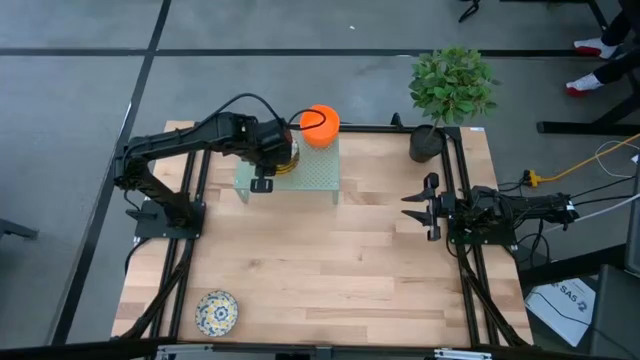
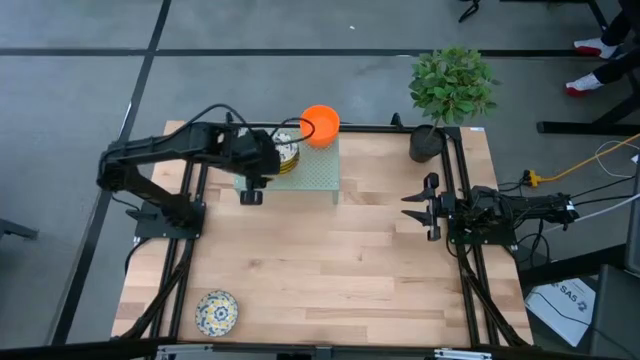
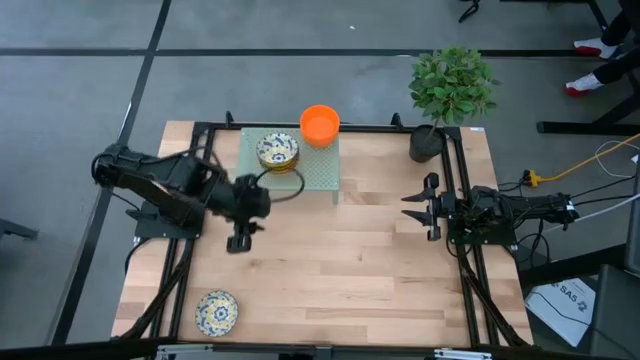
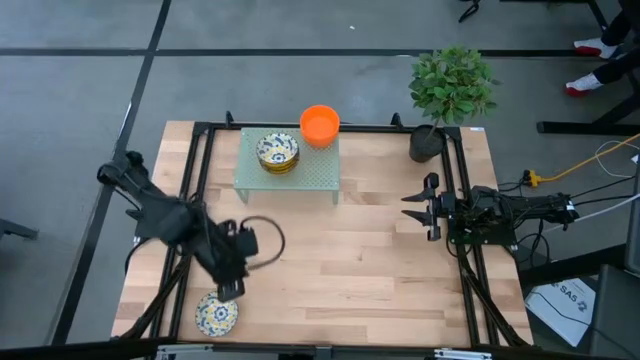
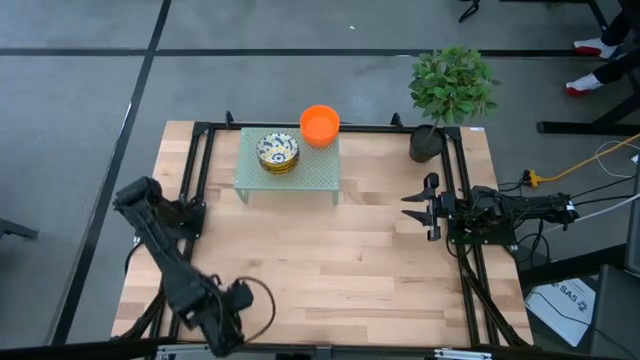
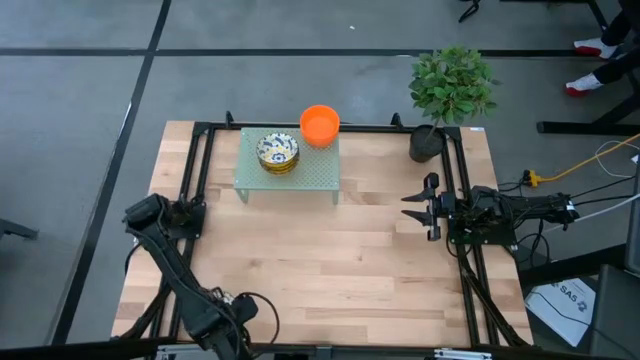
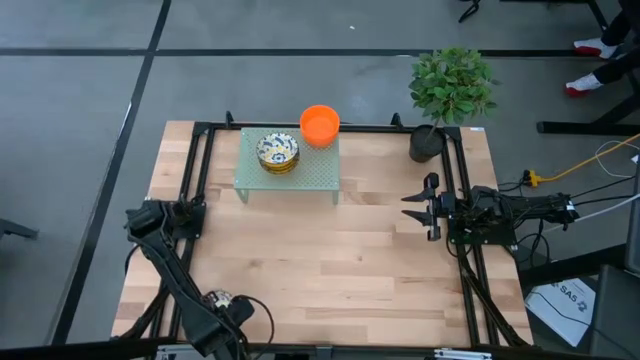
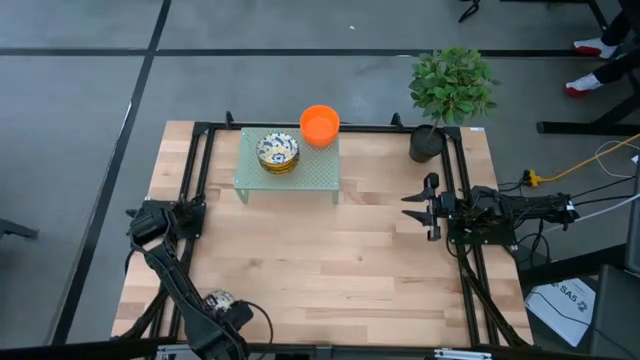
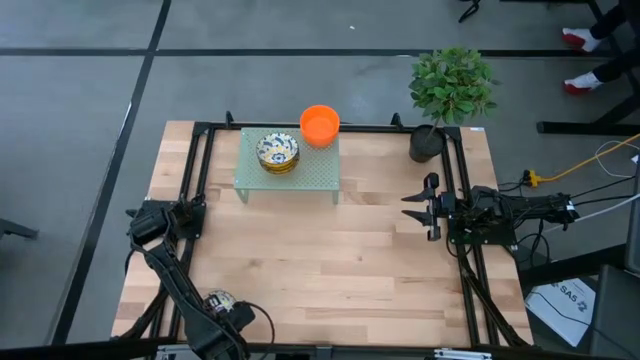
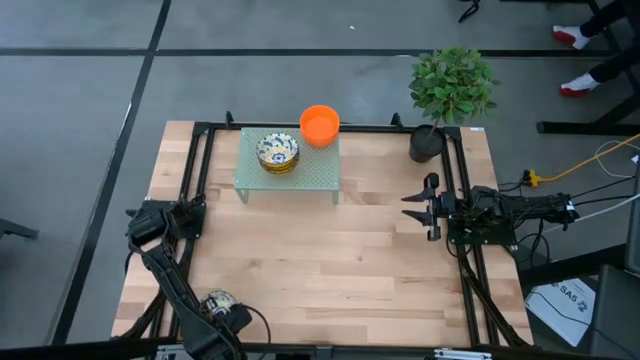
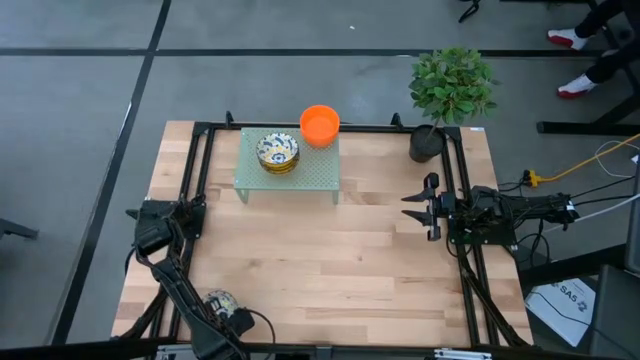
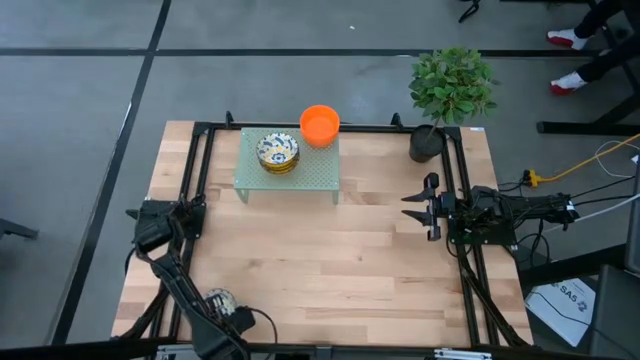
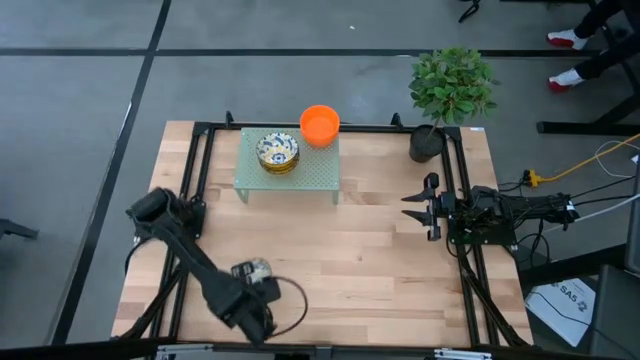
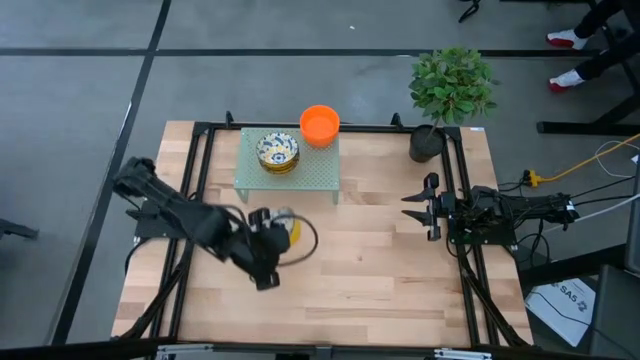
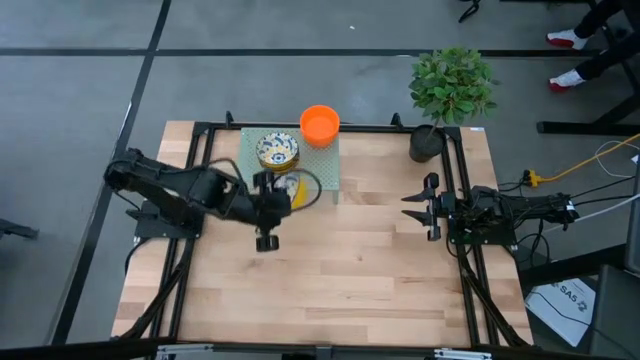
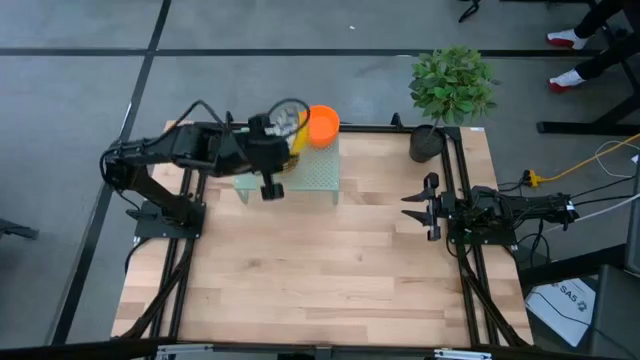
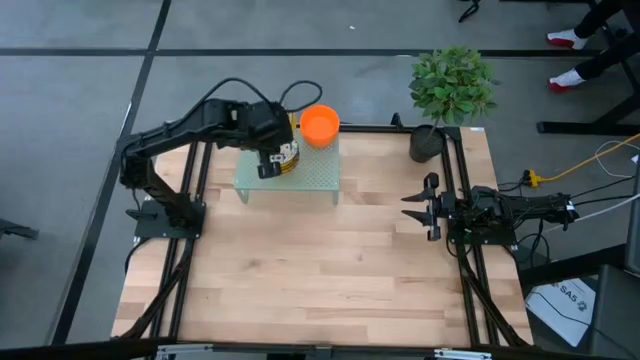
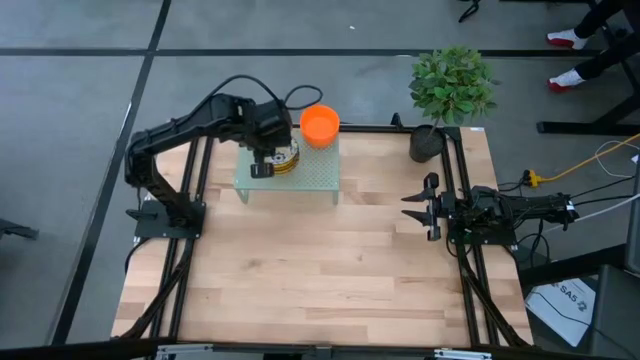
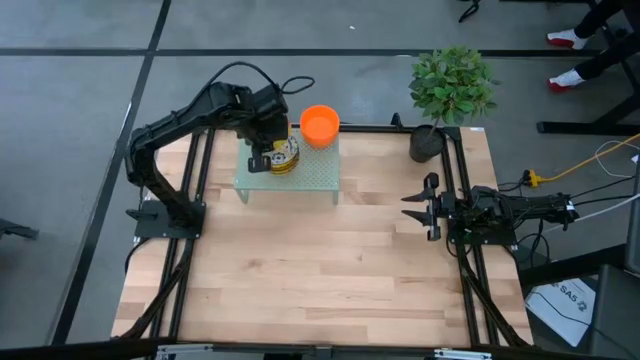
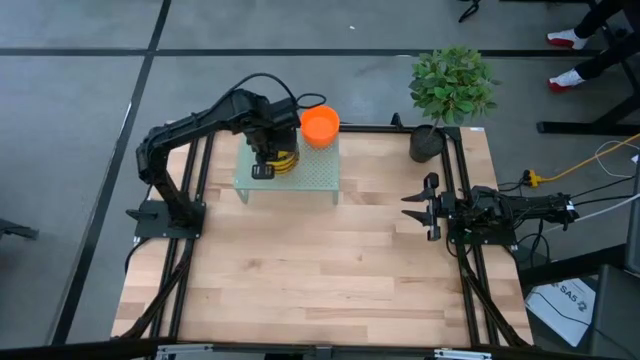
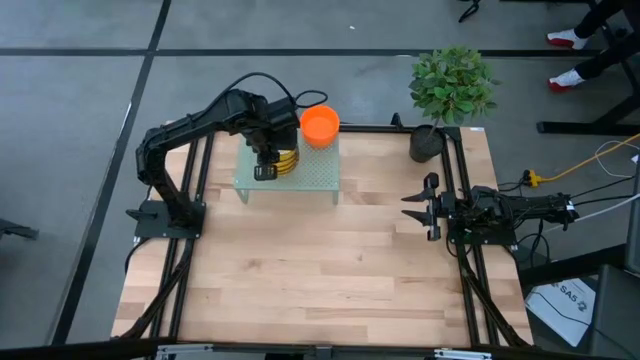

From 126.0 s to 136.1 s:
Task: Pick & Place Mini bowls
Stack the yellow bowl on top of the other yellow bowls on the shelf

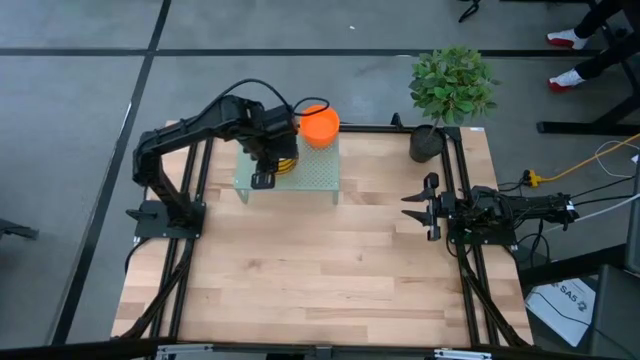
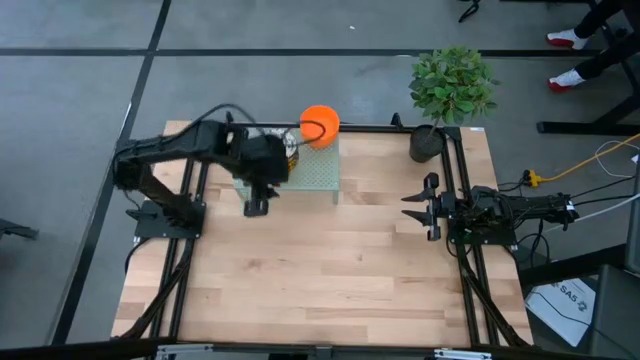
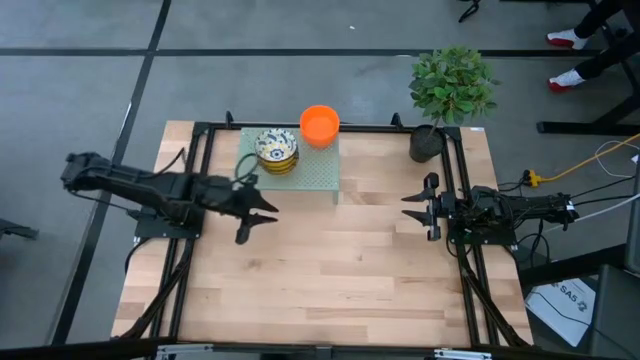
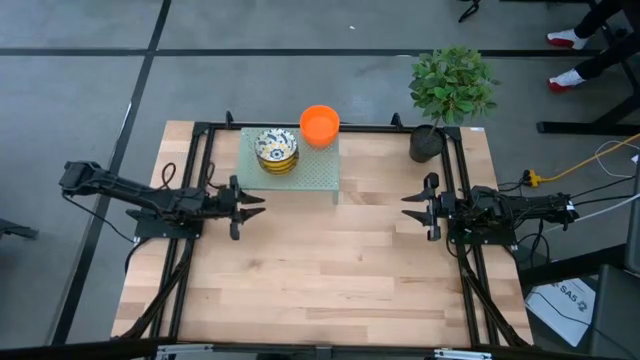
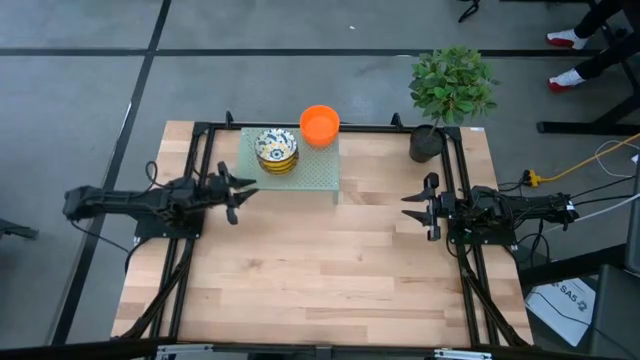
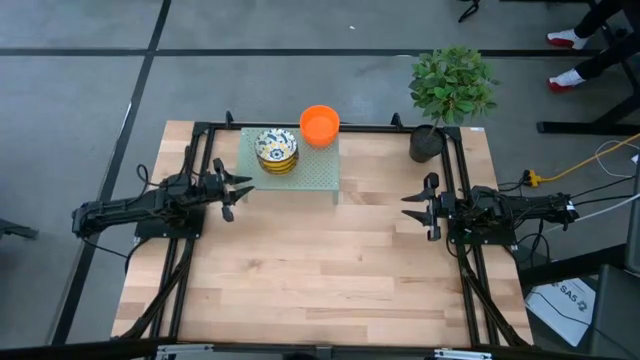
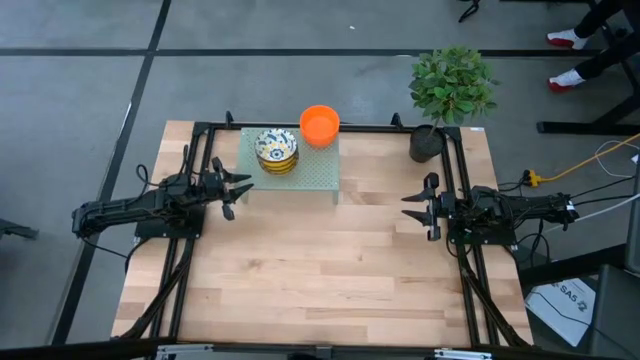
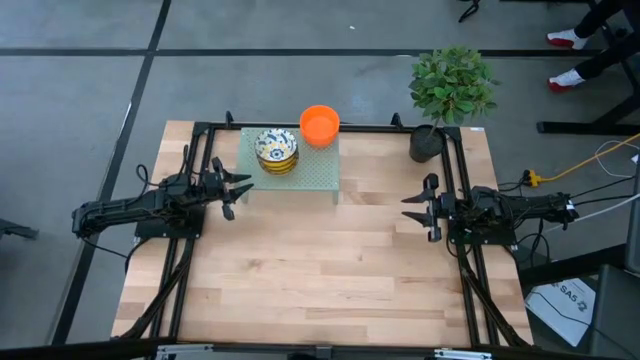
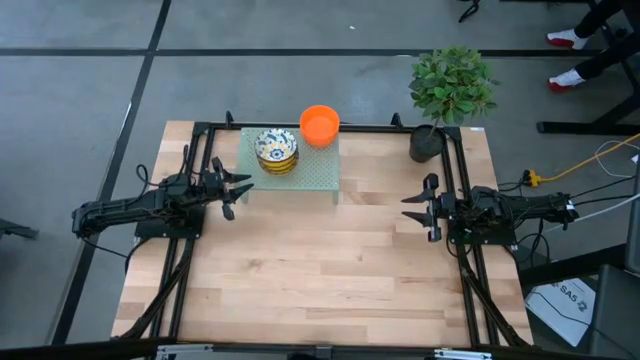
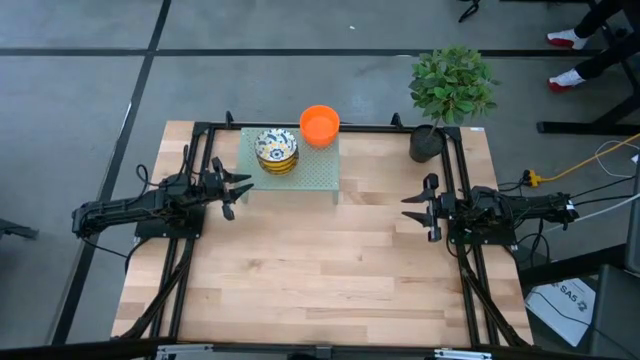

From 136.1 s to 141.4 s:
Return to Home Position

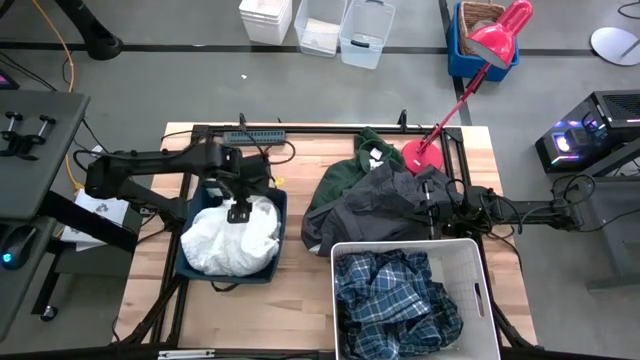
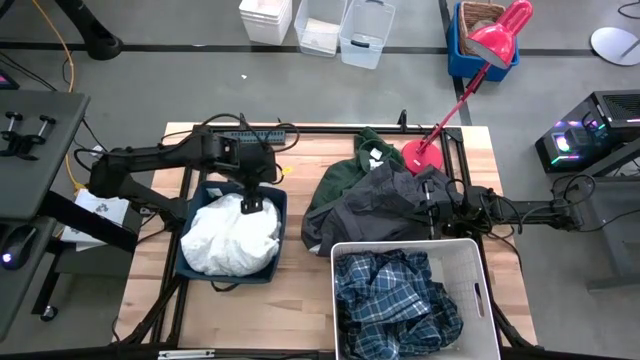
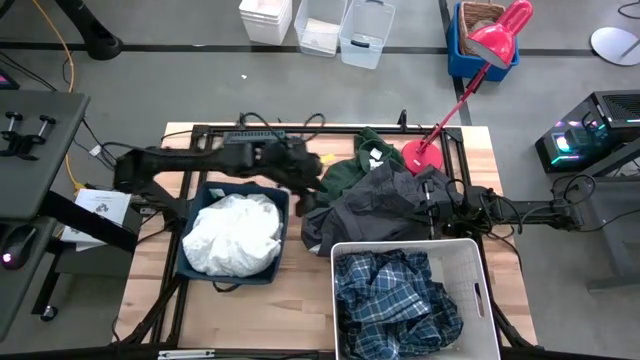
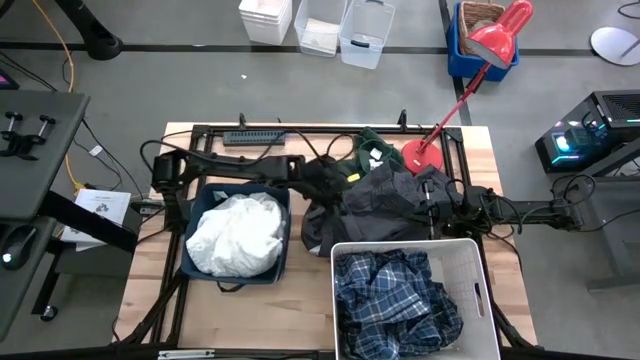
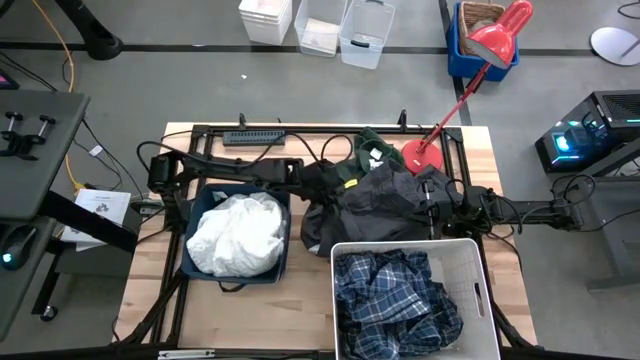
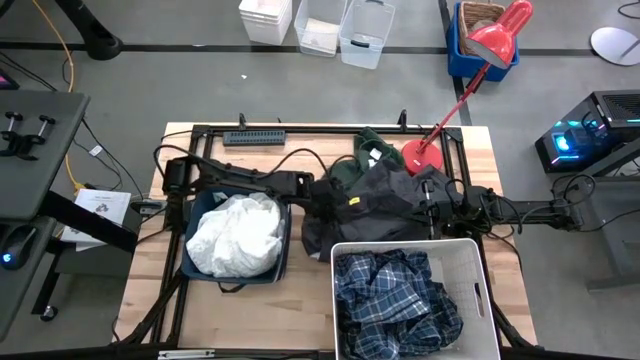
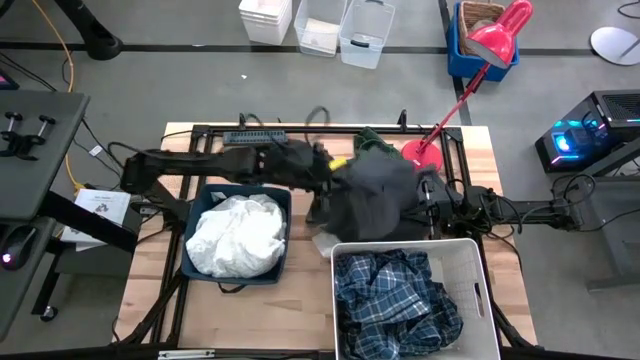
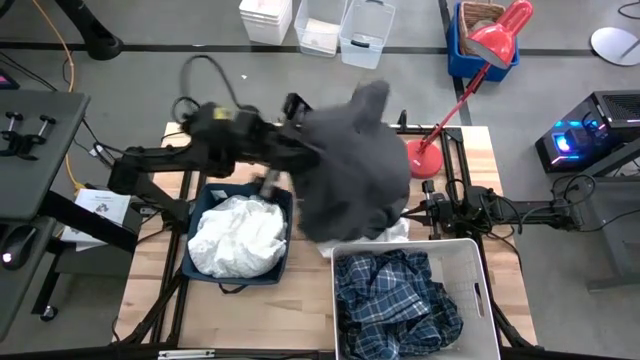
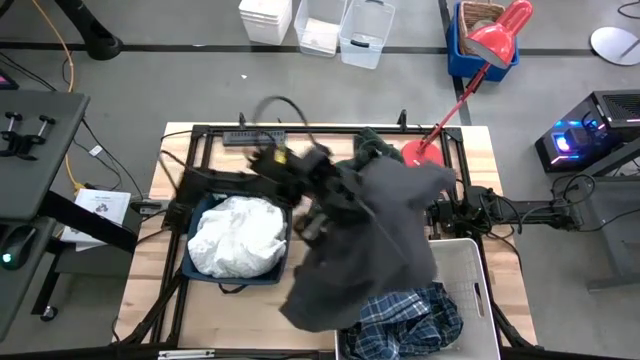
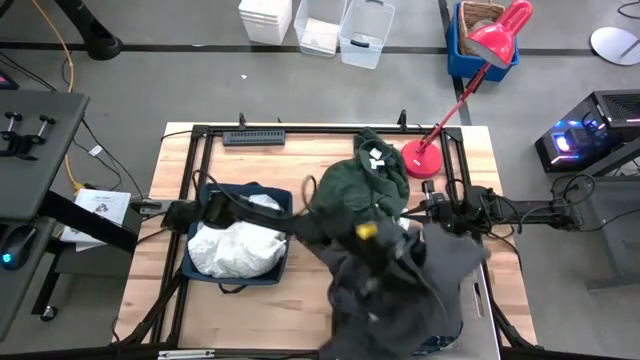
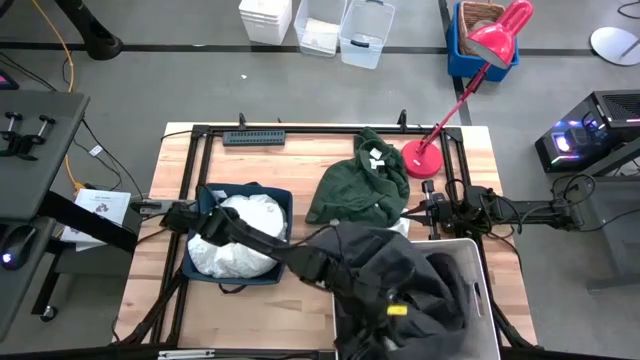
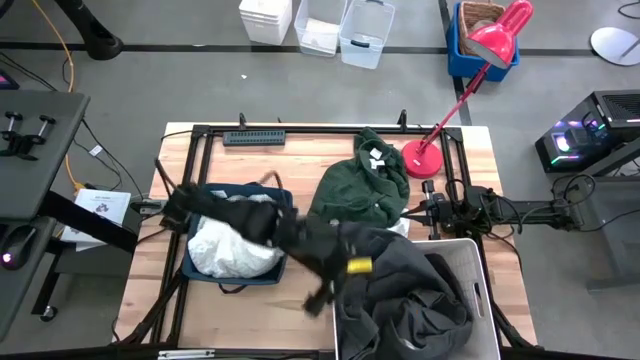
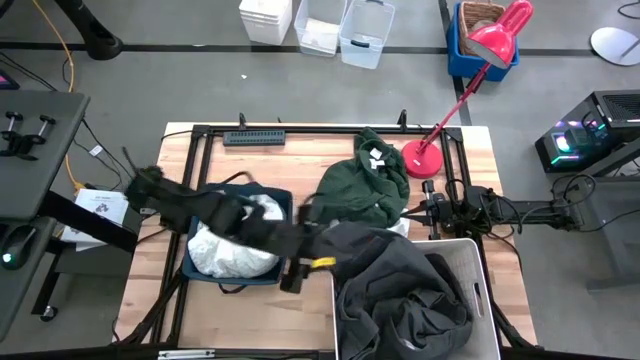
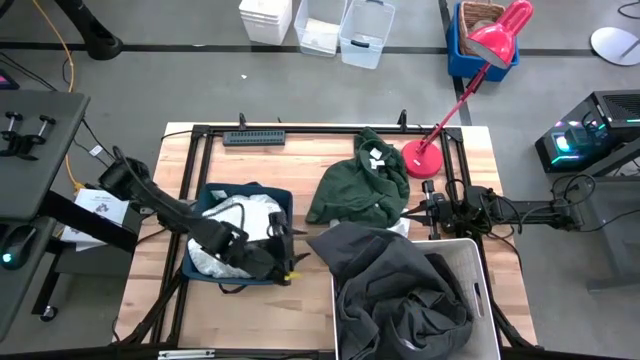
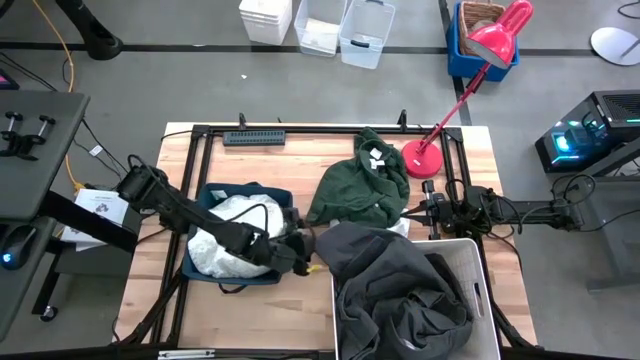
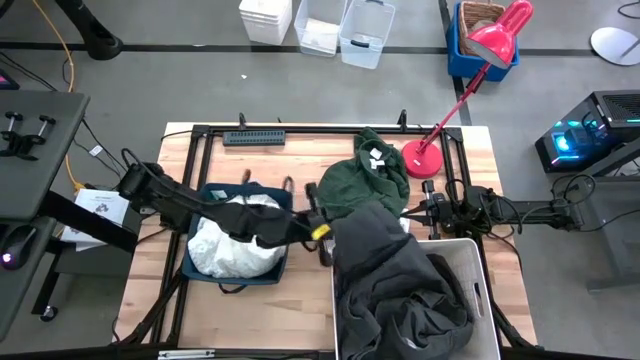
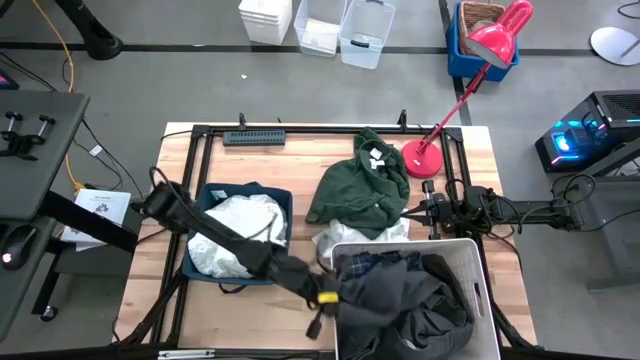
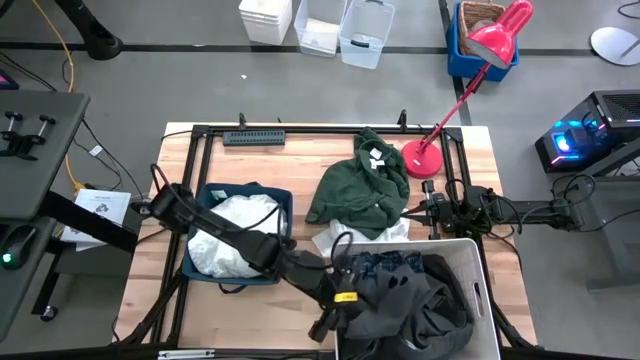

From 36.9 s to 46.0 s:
Task: Sort clothes
Put the gray shorts into the white laundry bin
